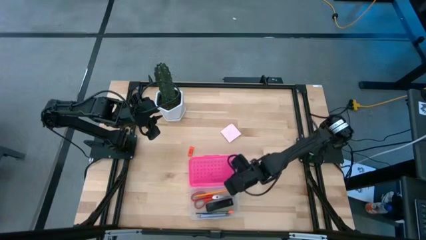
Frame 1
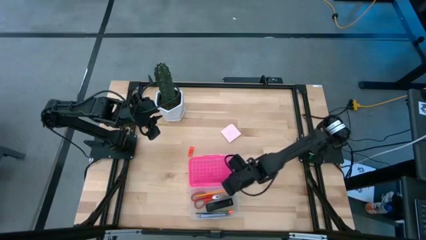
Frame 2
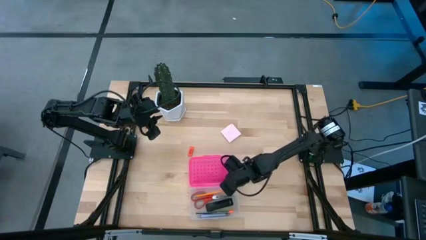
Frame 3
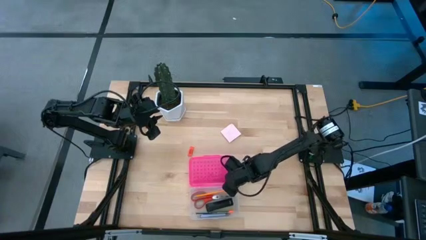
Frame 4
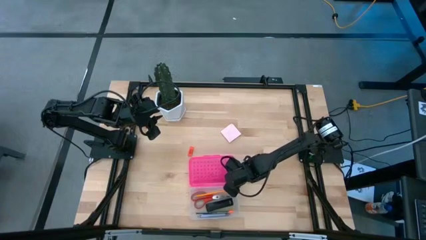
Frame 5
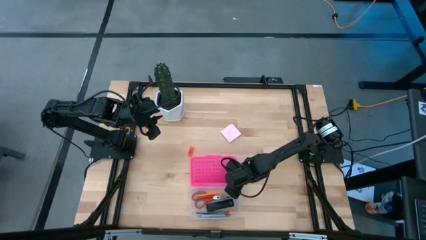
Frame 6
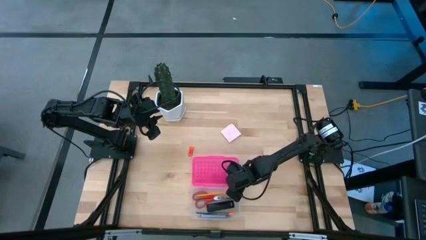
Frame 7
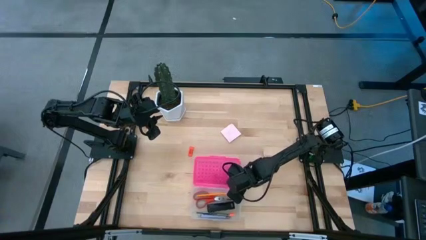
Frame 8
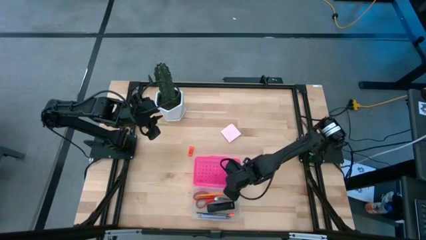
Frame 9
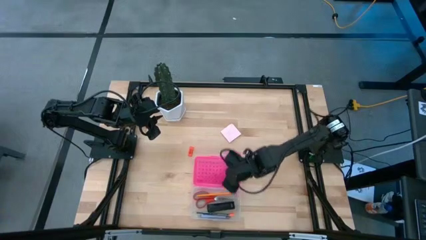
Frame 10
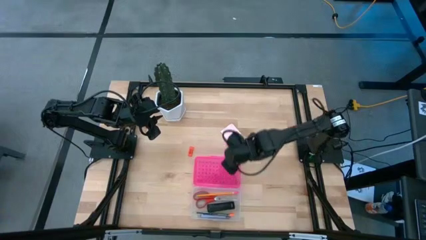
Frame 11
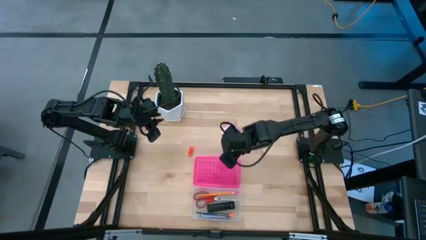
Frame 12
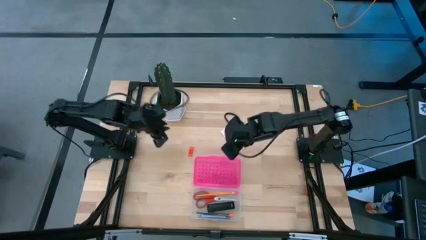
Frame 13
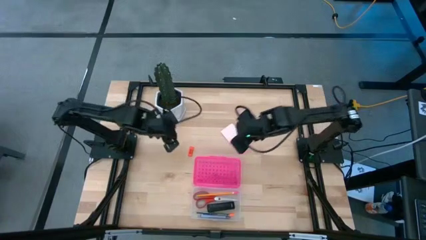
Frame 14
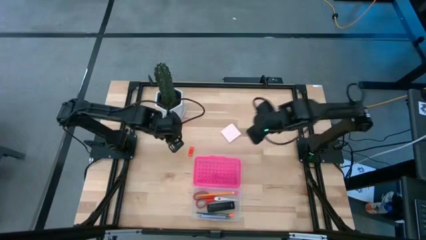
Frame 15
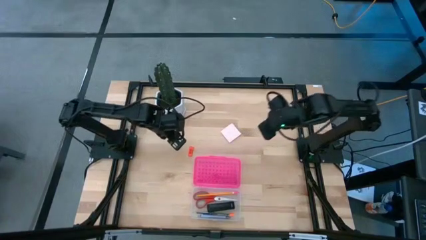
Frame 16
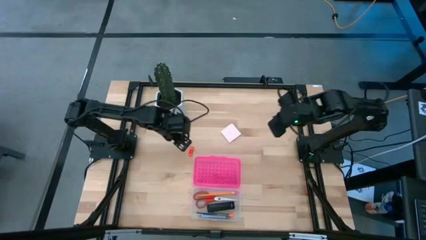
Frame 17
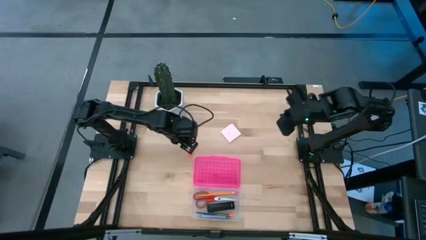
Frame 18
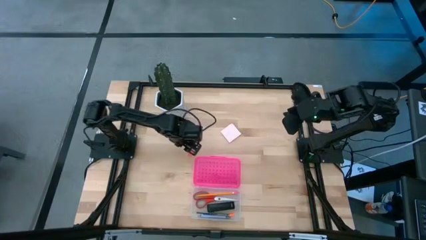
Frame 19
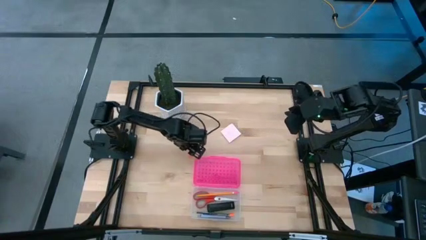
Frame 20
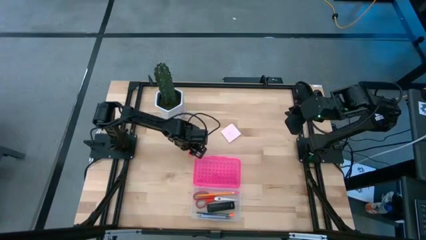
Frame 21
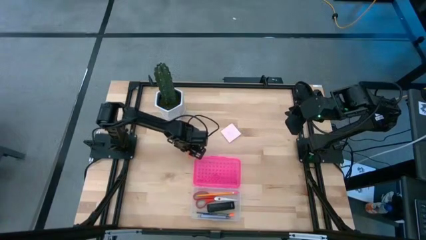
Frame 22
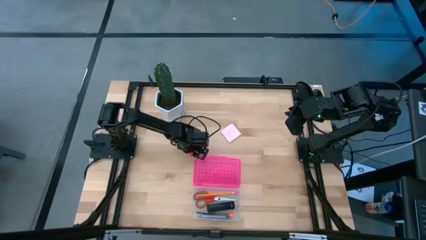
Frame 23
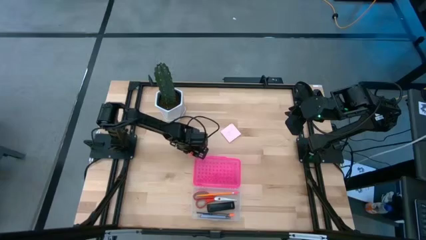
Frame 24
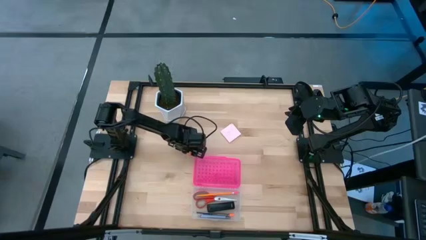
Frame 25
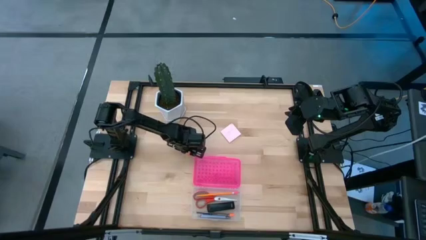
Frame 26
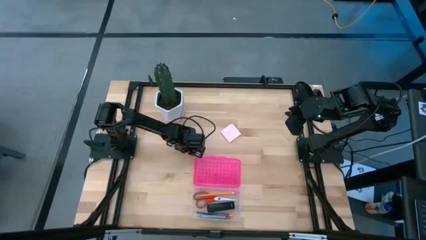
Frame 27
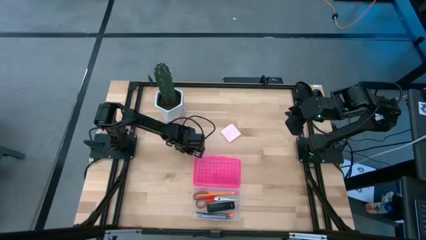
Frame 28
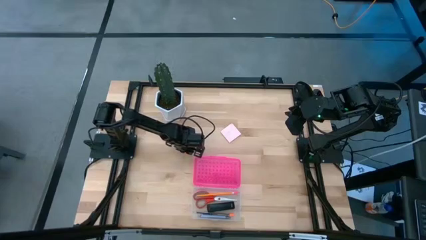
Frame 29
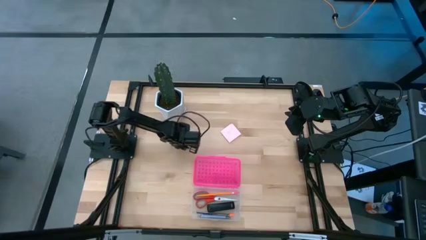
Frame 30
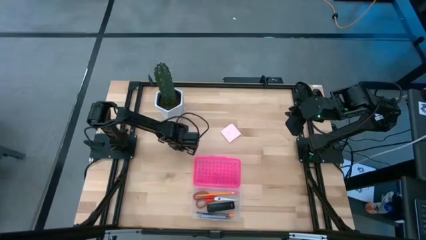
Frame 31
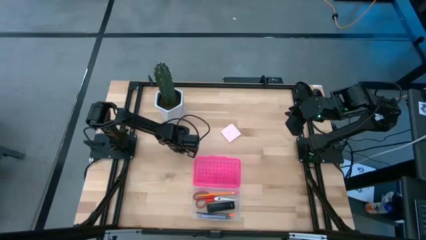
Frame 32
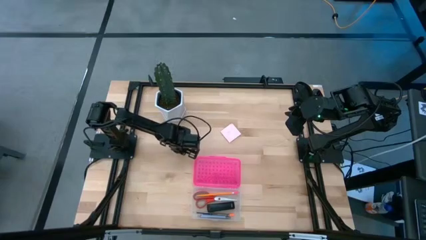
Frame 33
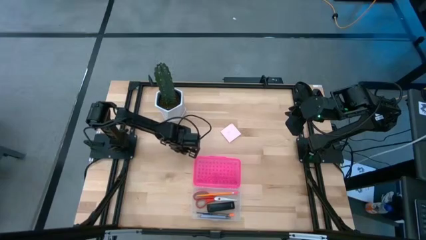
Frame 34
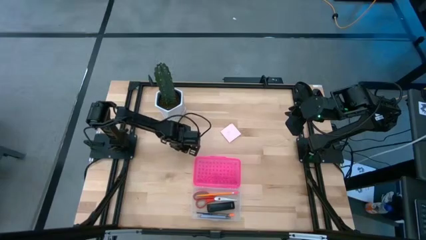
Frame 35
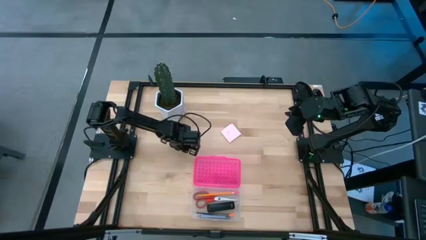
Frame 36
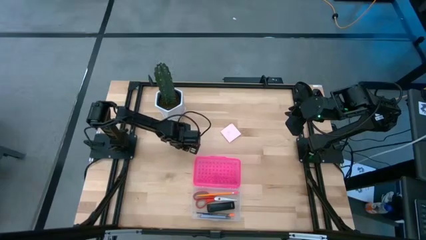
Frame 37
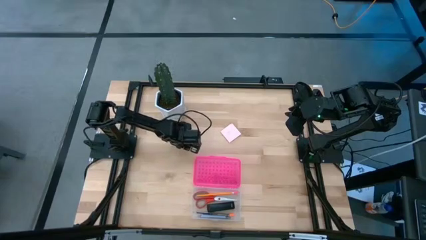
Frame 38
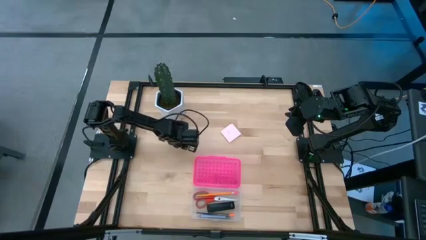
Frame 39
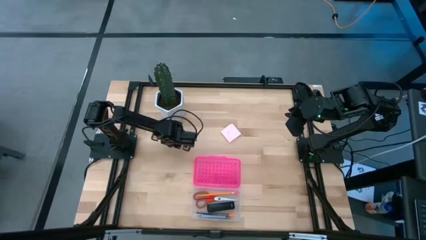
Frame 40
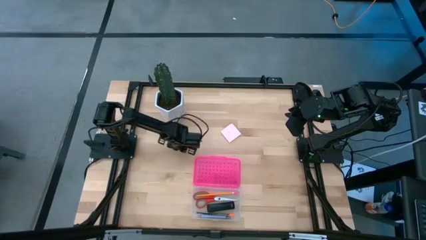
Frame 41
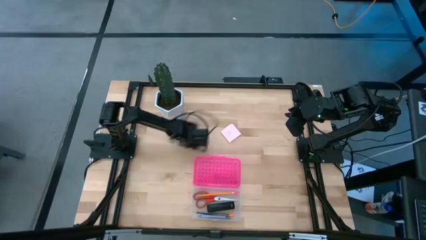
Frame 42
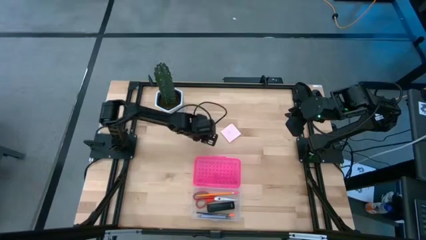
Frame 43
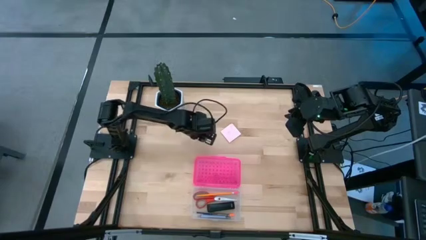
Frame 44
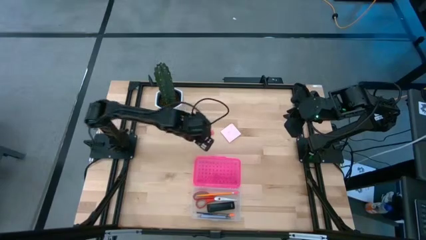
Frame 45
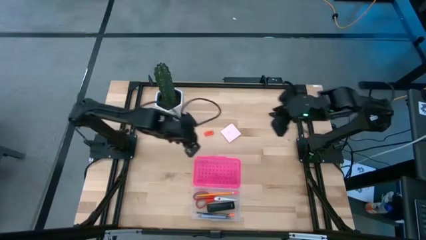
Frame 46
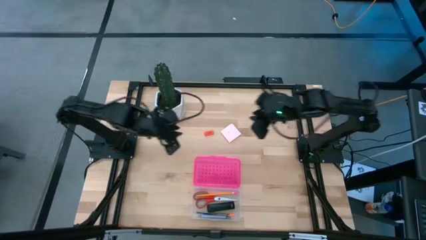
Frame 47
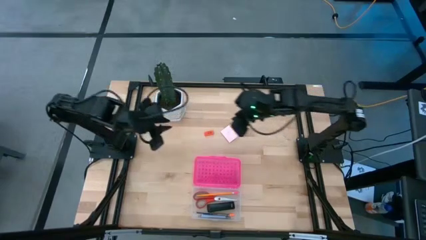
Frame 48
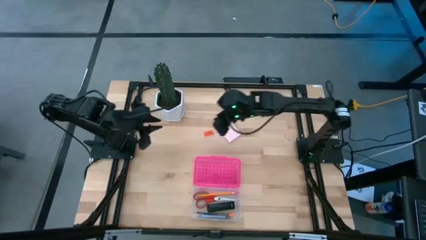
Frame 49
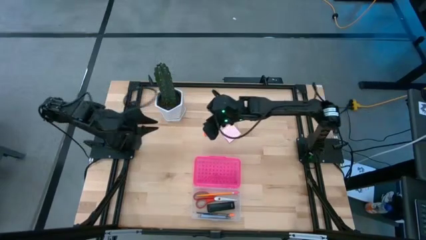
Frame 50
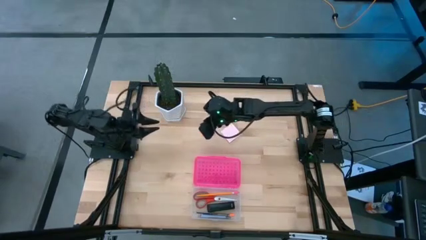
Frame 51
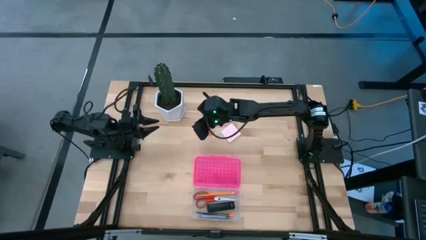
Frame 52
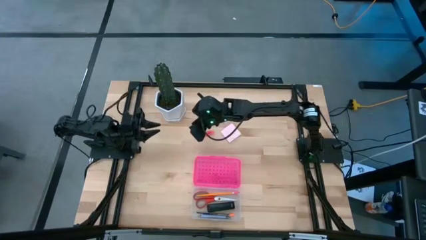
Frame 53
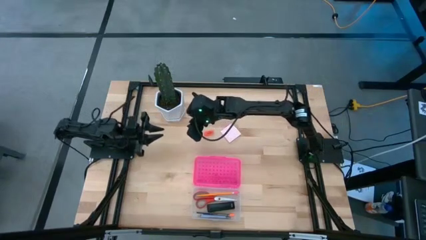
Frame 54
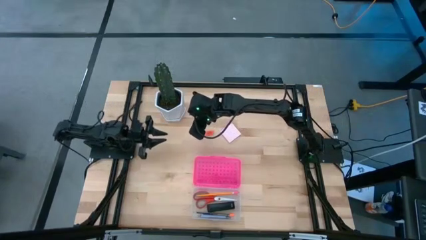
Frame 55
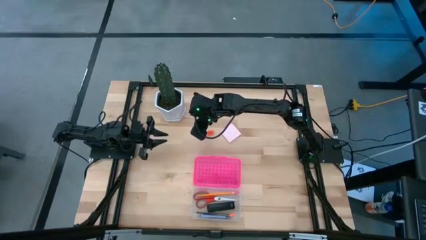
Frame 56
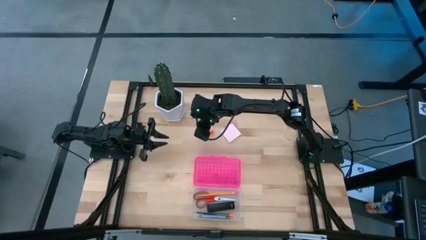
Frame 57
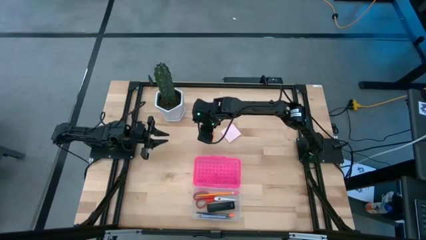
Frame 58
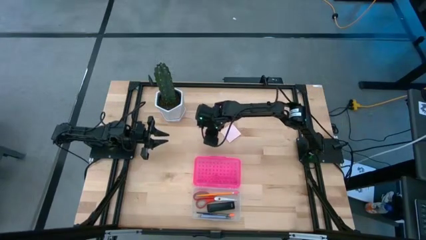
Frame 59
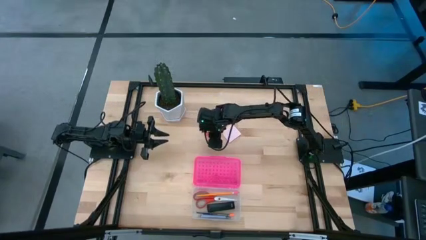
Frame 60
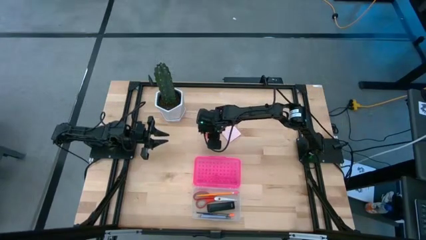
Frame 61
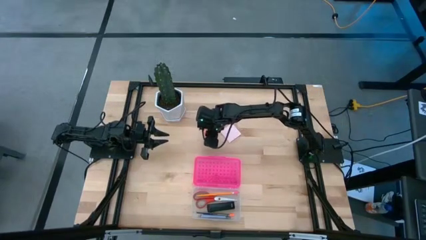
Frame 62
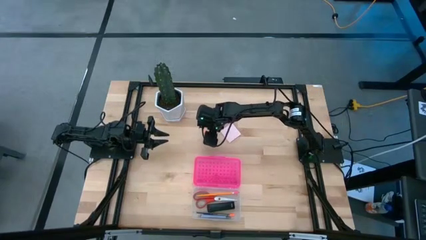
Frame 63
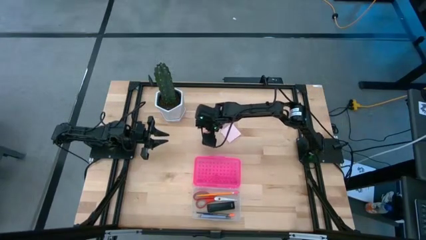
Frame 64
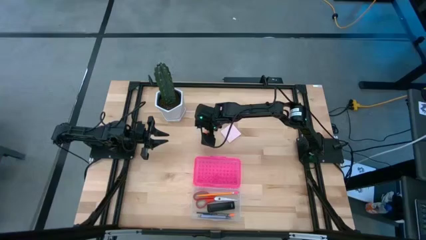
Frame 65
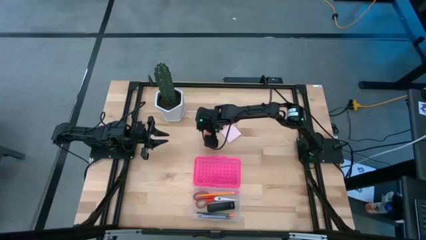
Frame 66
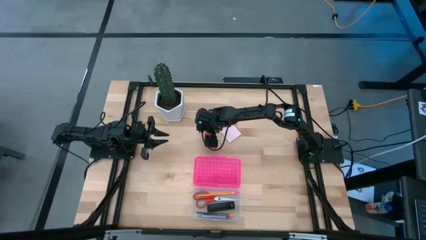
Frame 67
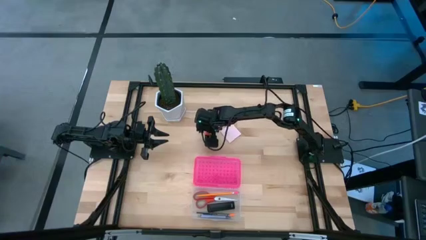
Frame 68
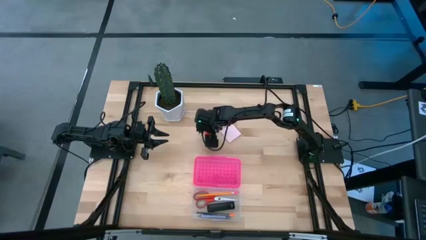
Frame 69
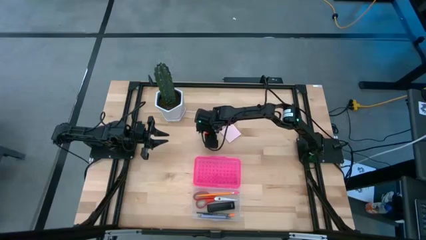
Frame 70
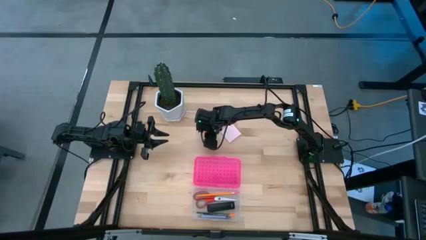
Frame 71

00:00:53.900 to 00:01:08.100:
Task: Pack school essentials
Put the orange eraser into the pencil case

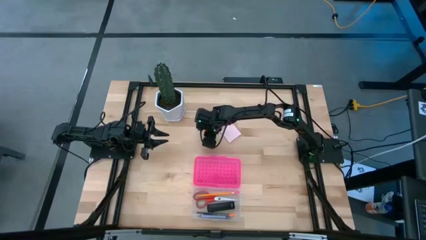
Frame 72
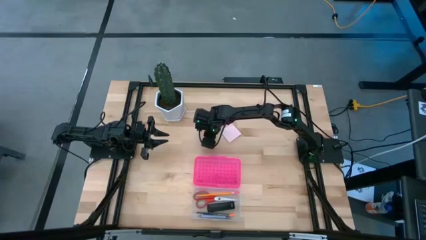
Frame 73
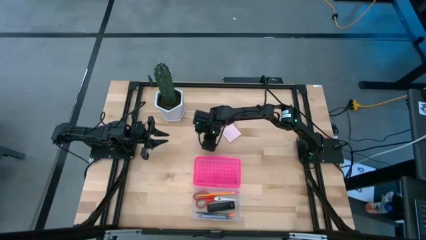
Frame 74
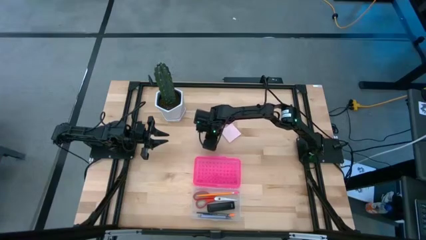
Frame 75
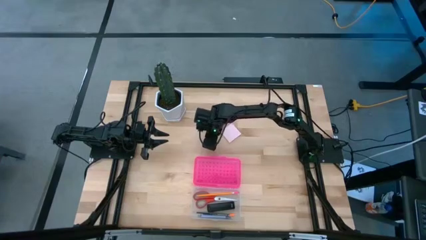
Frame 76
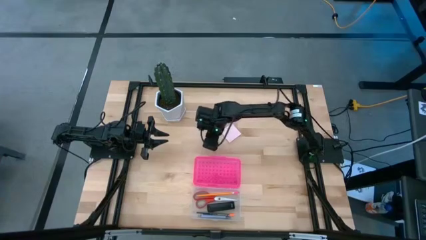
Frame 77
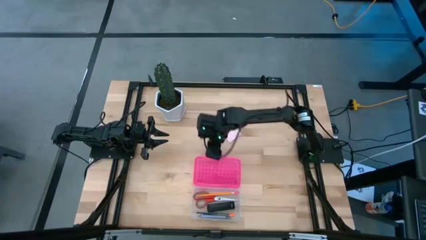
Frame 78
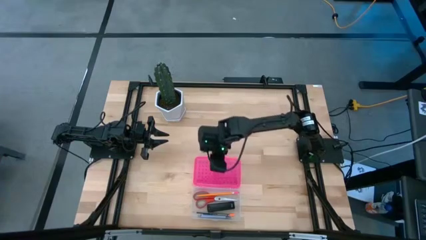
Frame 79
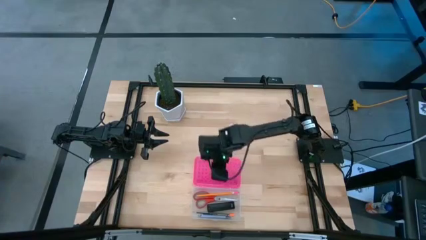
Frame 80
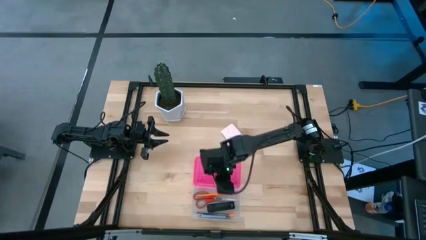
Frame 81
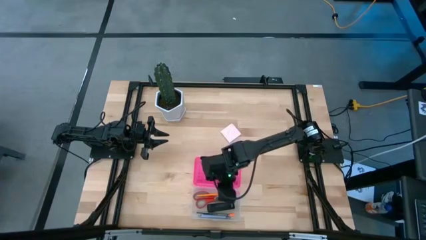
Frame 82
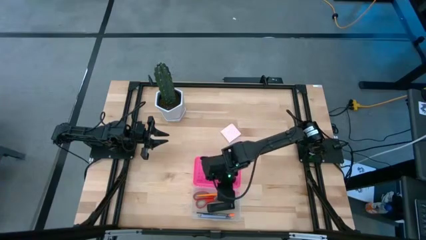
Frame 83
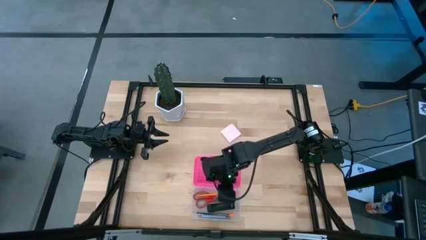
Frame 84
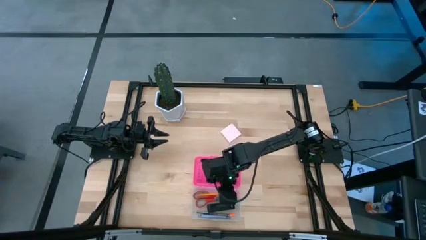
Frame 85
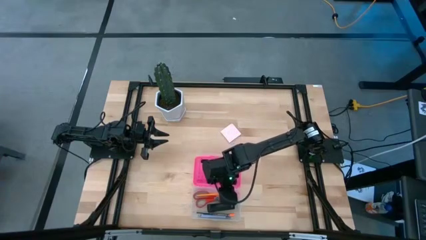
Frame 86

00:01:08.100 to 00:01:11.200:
Put the orange eraser into the pencil case
